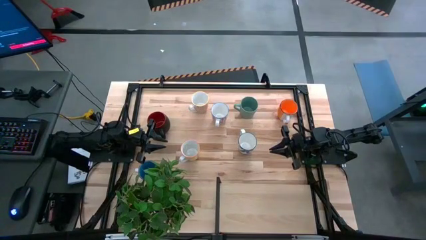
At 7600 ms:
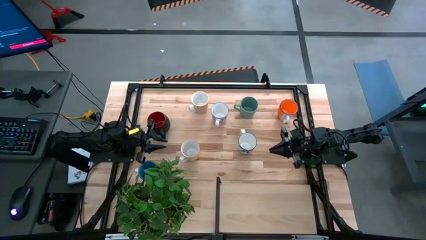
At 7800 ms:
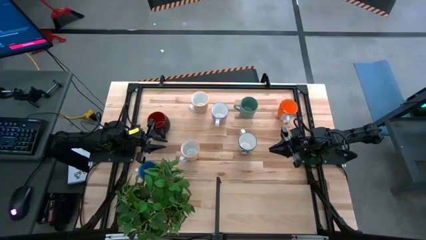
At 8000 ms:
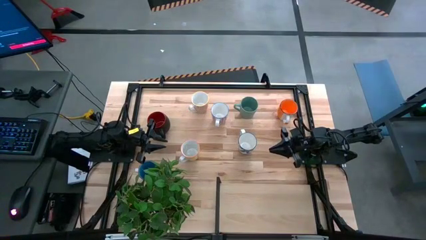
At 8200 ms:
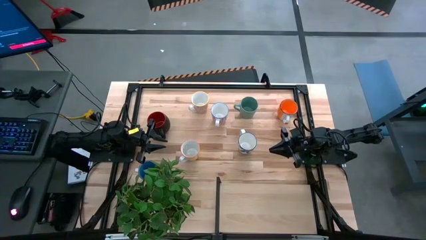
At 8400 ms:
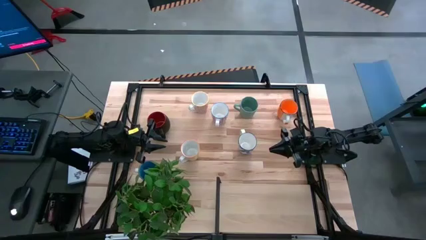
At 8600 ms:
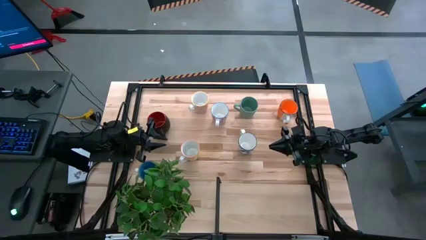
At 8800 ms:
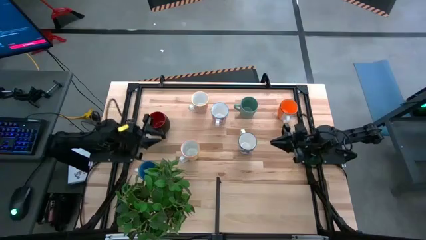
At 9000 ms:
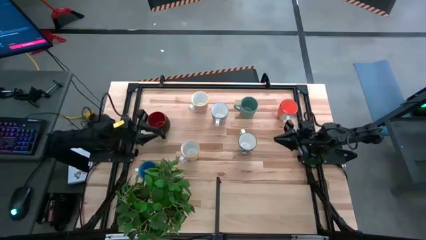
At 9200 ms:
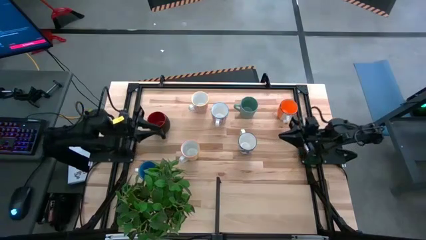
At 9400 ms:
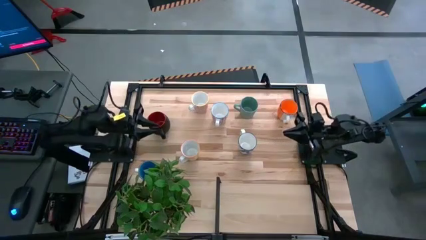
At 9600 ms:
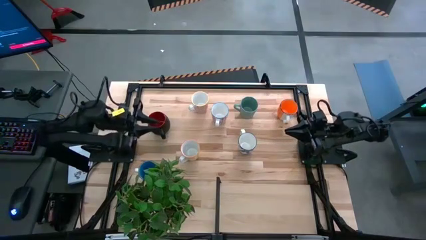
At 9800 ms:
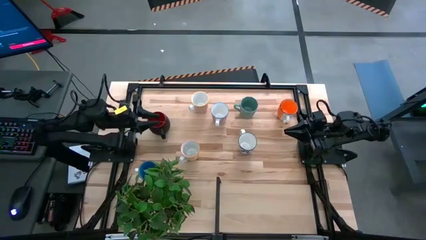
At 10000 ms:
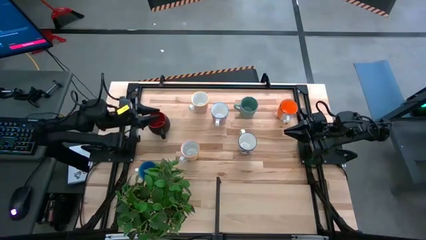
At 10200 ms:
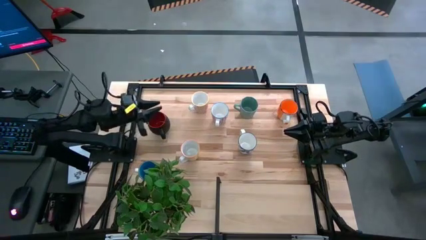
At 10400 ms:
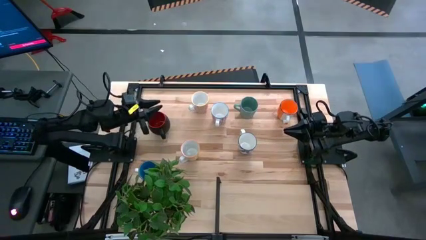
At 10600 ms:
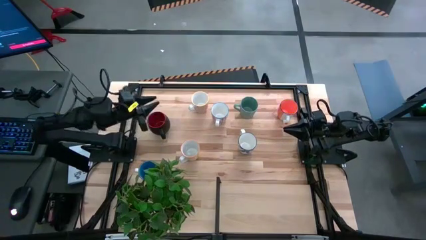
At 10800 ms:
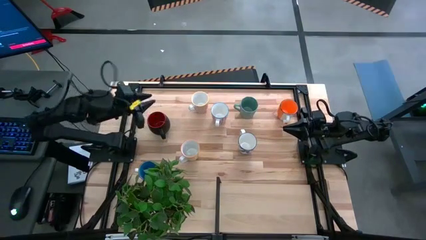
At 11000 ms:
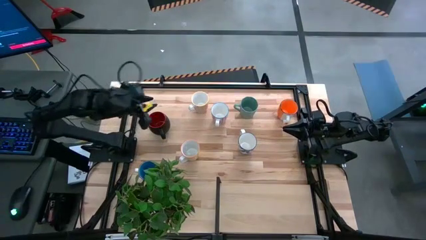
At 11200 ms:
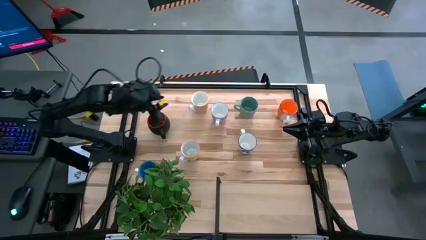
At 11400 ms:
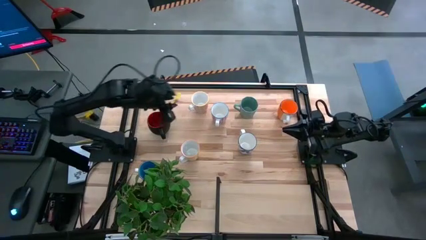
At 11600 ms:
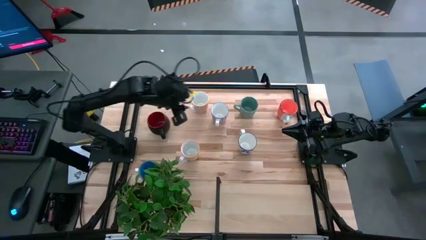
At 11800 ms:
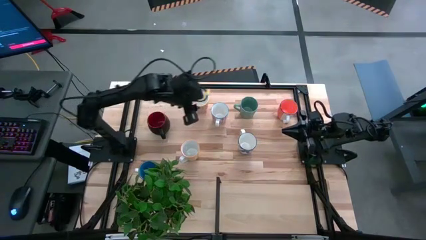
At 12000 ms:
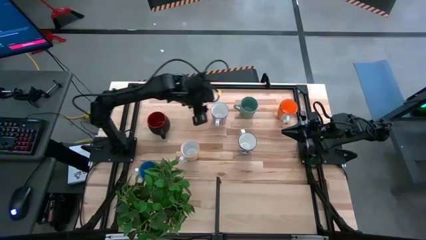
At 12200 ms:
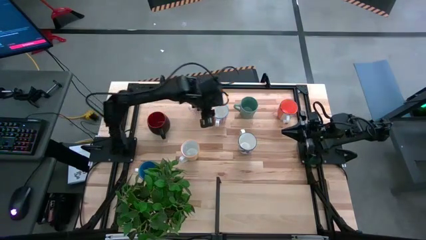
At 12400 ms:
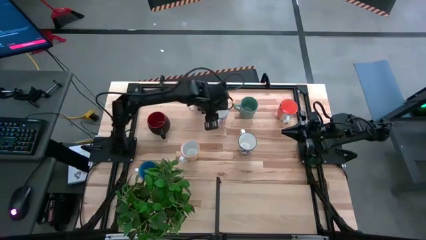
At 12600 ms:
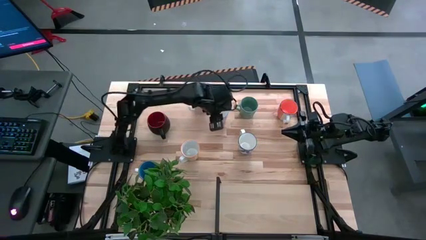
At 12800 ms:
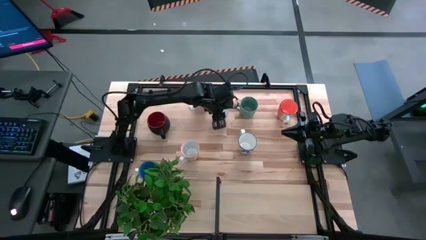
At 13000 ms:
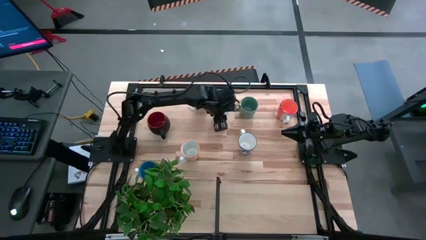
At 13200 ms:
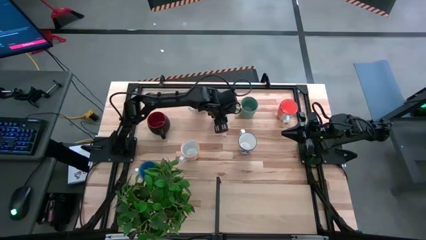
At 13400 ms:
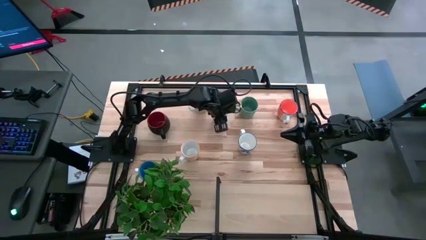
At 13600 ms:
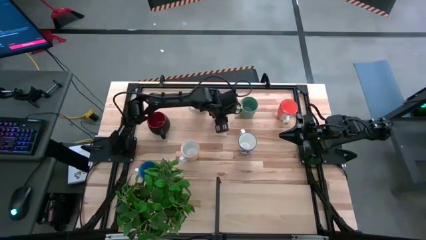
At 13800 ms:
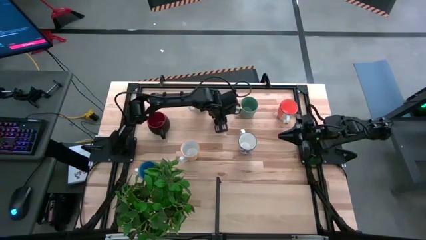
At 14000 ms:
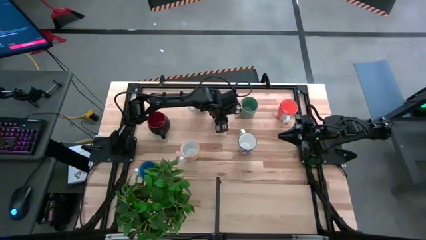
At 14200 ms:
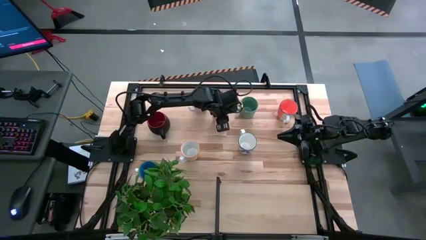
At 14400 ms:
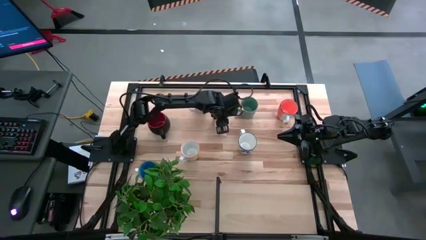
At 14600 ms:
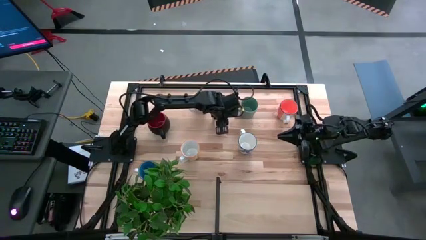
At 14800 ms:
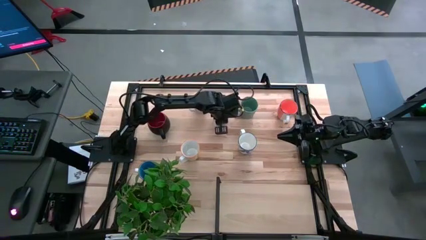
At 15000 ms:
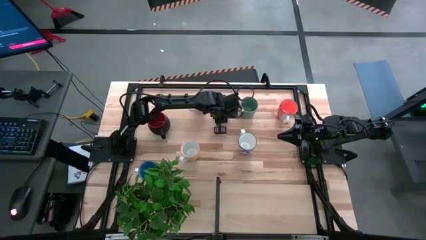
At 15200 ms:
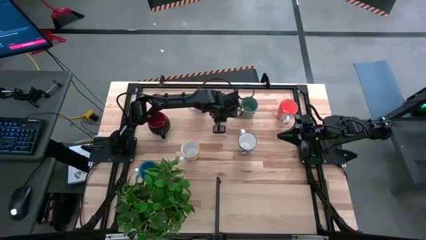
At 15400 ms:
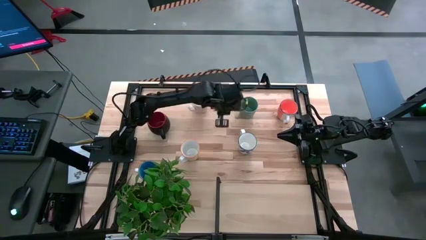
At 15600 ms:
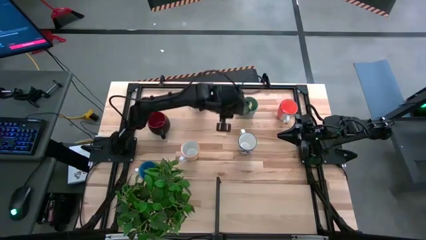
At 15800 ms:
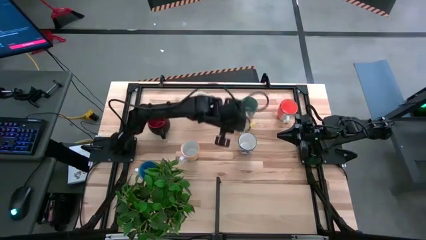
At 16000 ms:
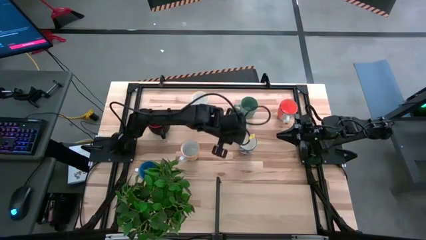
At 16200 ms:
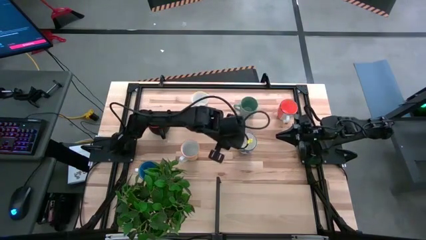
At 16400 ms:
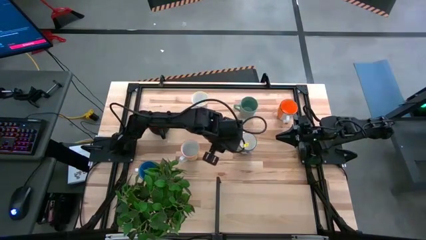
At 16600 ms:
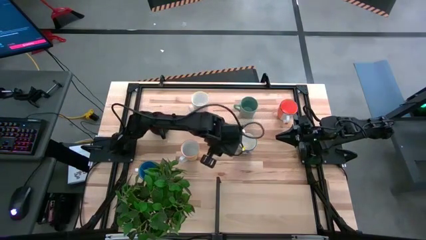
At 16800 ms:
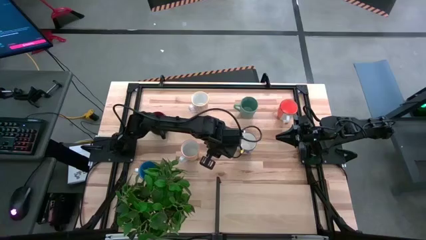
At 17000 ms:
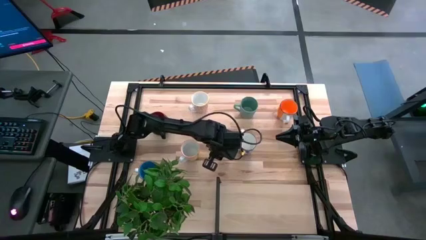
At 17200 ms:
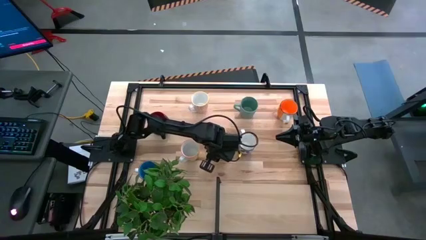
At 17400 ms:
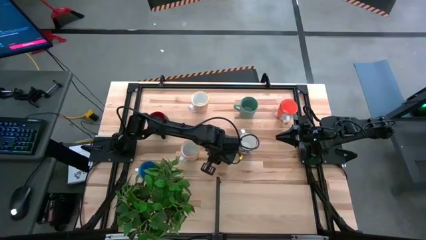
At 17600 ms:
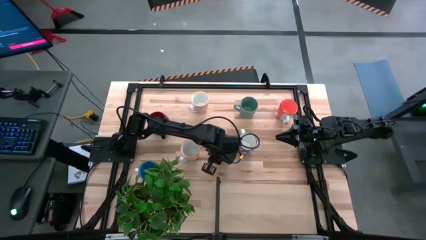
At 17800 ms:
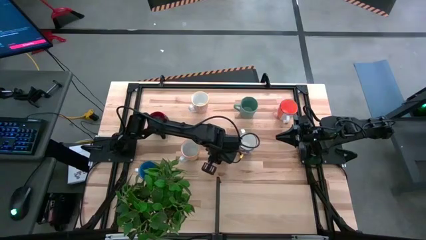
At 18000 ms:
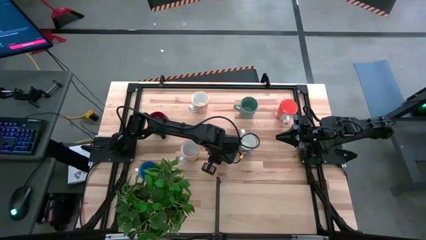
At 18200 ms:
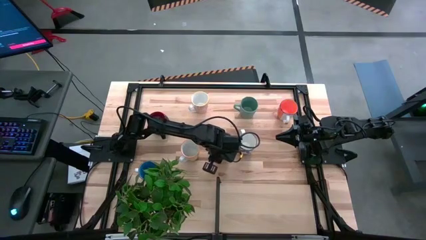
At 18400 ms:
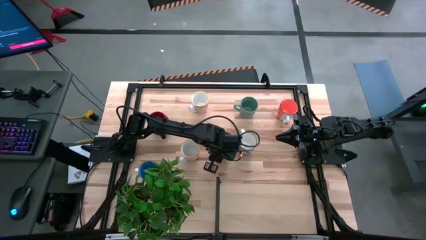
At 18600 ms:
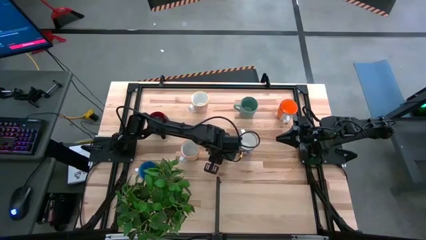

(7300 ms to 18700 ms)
Task: Place coffee mugs
Move the red patterned mug to the left of the blue patterned mug

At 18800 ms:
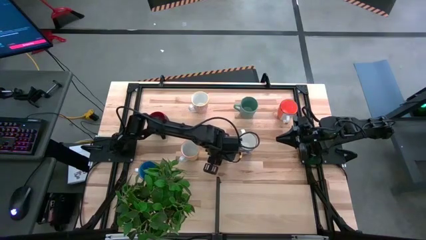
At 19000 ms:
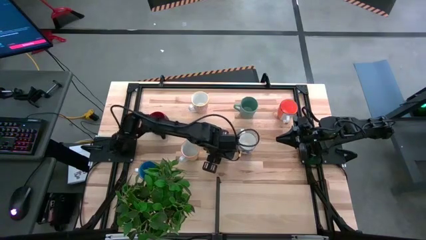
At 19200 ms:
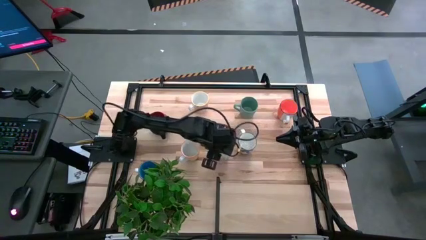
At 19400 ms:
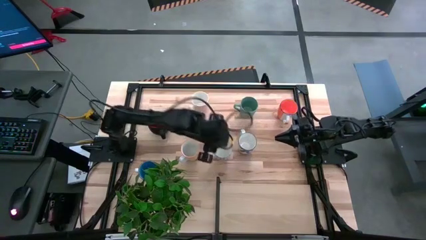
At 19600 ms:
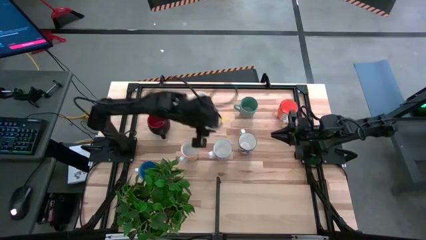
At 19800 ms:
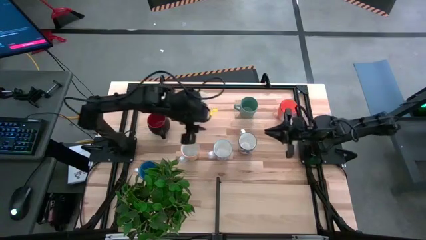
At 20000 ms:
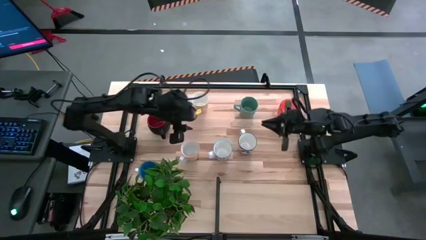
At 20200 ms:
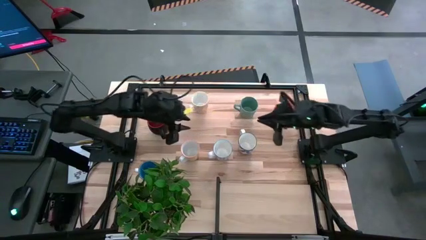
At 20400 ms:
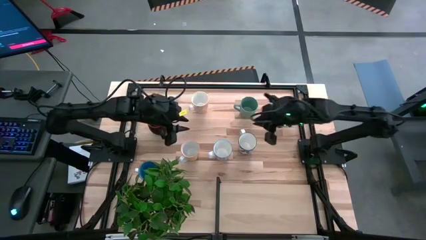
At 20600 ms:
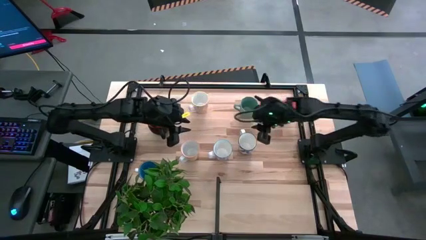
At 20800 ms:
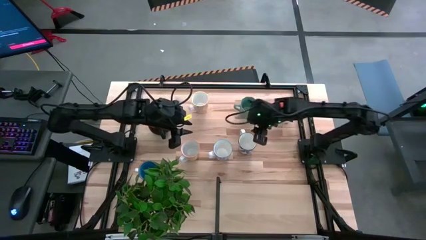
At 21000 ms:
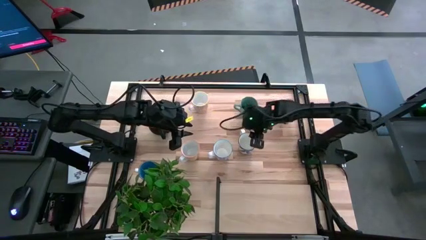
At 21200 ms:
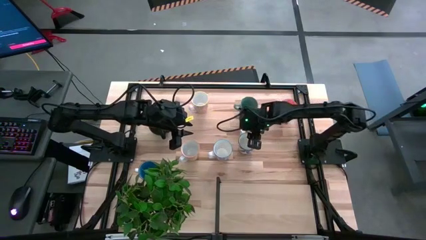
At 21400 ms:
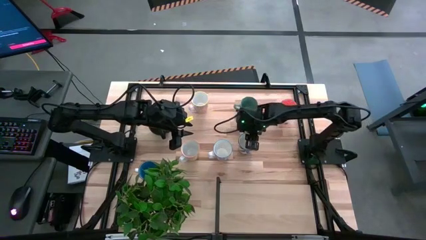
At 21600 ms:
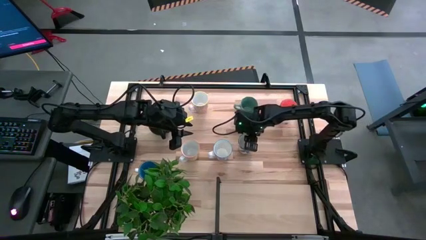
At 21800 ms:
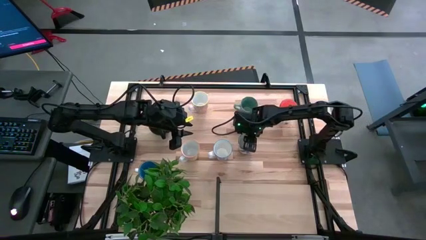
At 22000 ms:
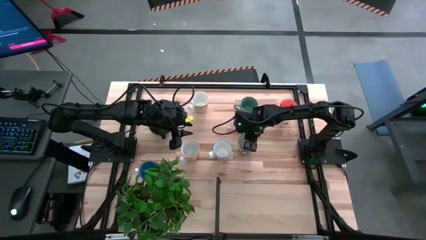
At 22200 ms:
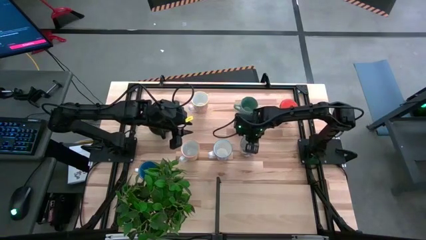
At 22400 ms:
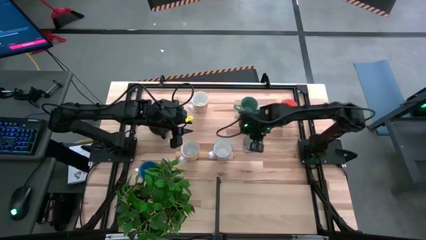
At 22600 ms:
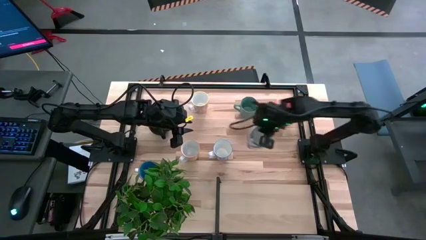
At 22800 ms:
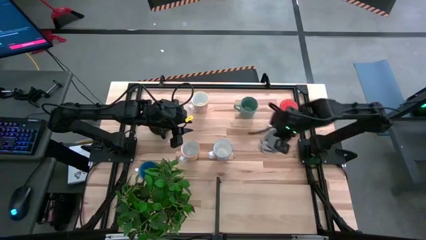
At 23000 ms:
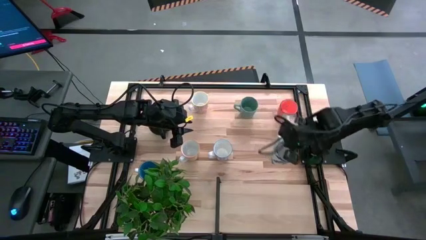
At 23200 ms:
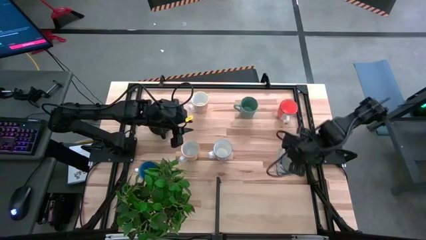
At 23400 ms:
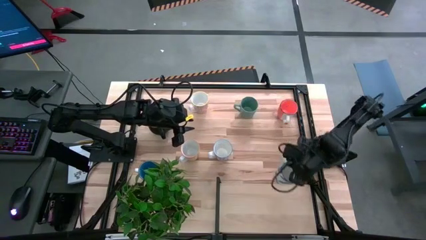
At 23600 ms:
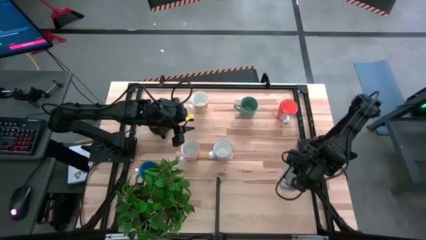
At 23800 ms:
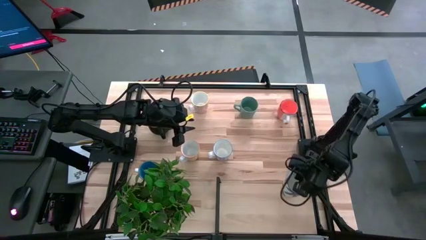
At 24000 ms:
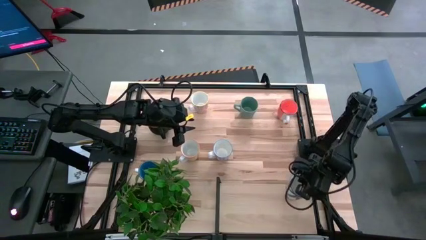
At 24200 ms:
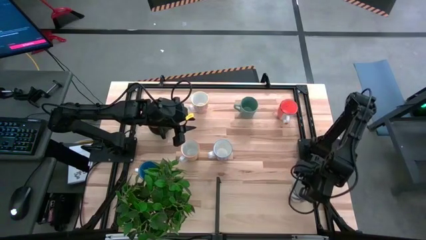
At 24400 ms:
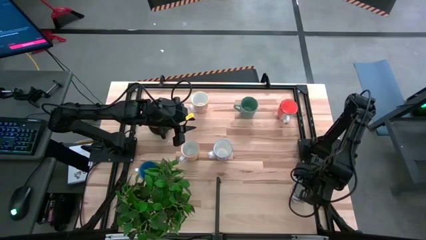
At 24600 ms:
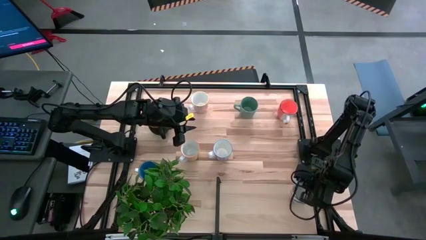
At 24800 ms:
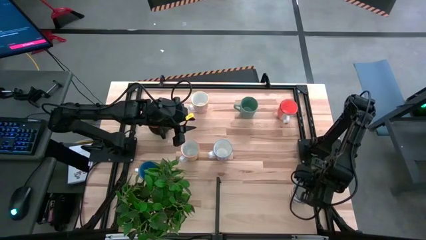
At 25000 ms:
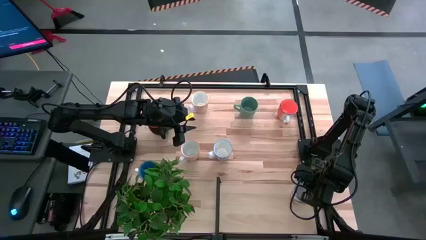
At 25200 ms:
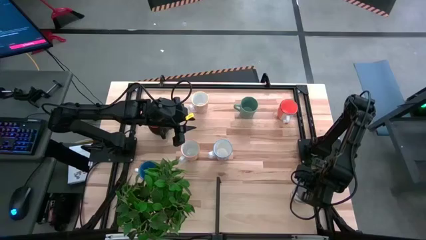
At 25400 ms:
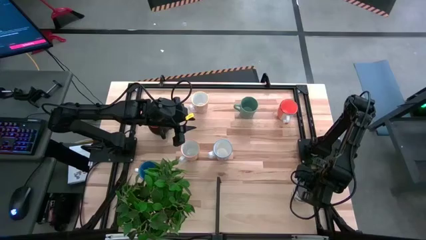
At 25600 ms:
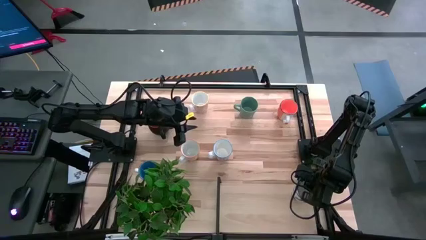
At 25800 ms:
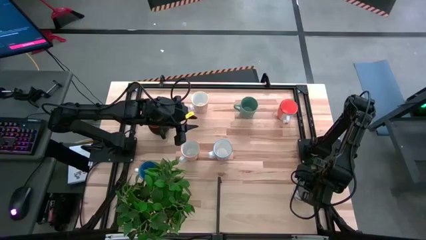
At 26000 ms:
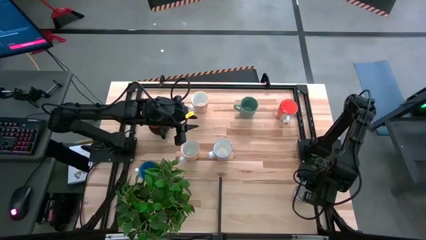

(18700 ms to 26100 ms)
Put the blue patterned mug on the shelf
